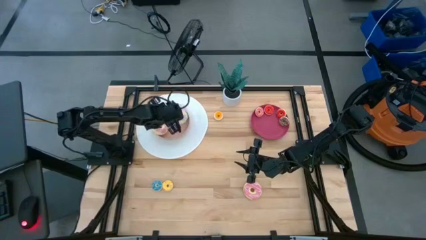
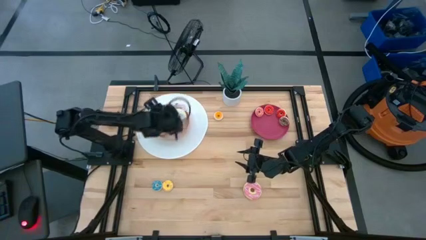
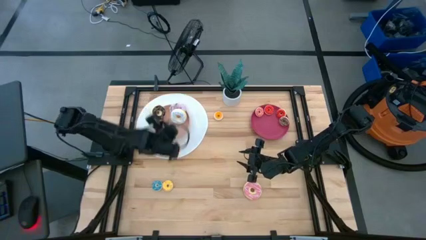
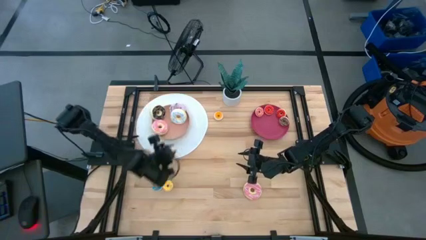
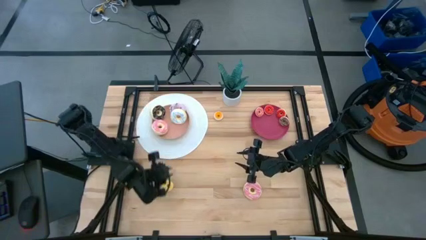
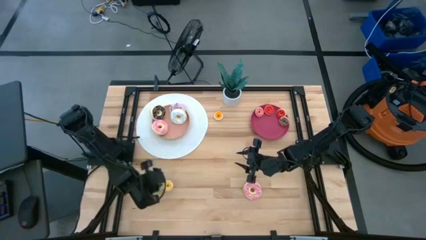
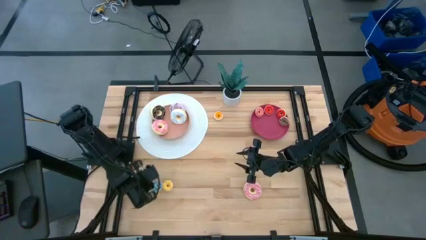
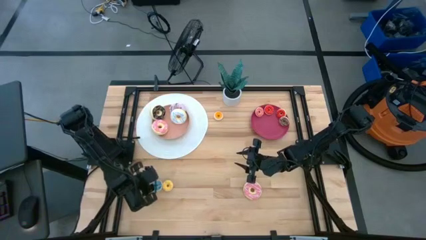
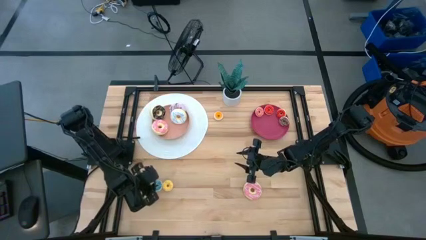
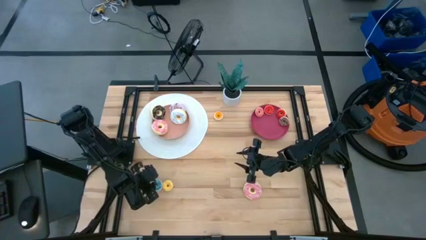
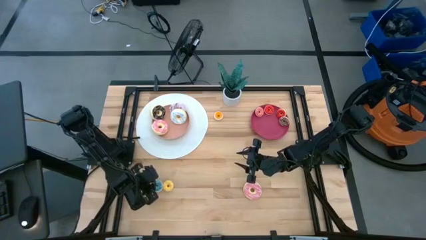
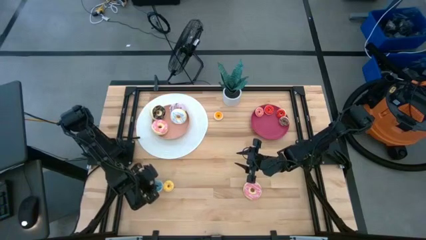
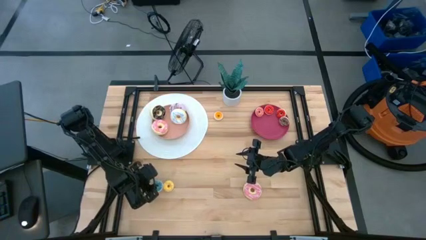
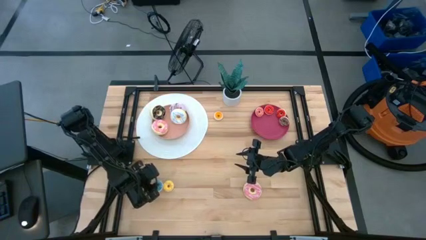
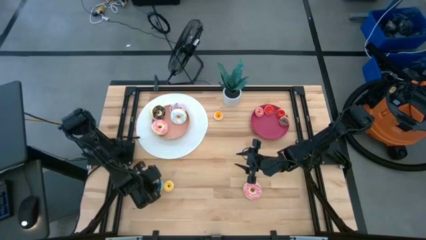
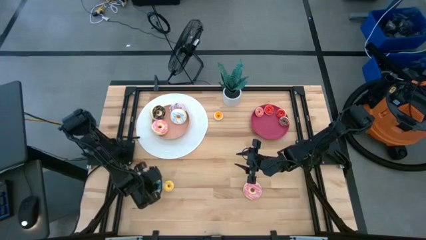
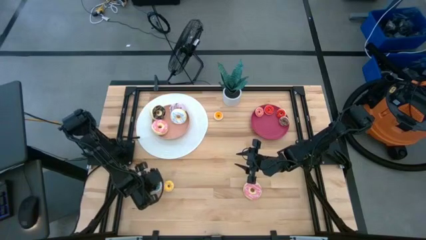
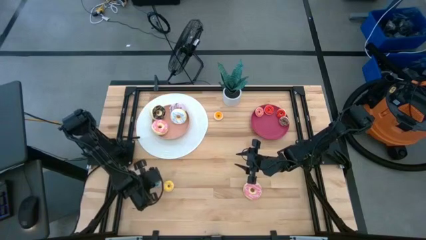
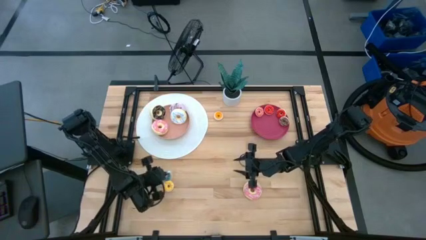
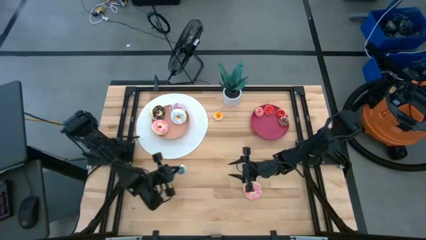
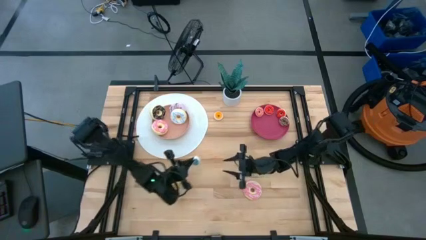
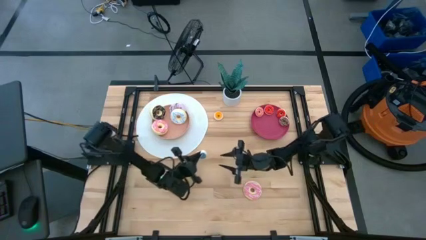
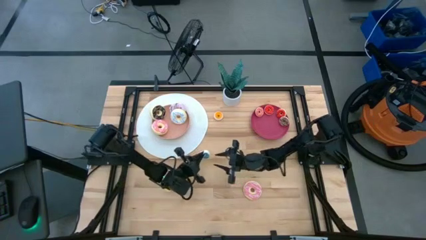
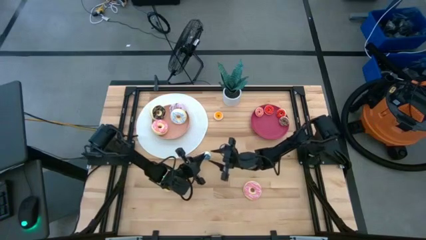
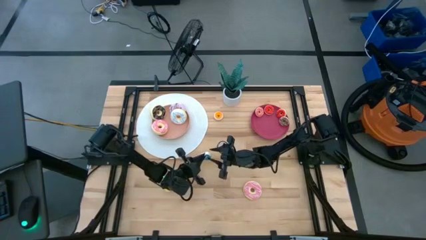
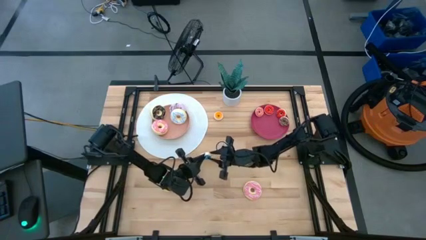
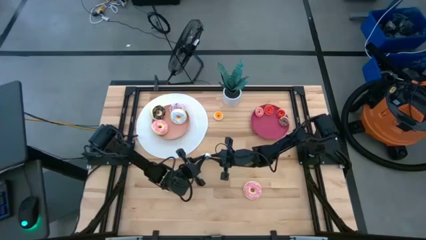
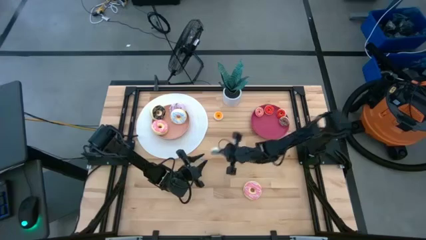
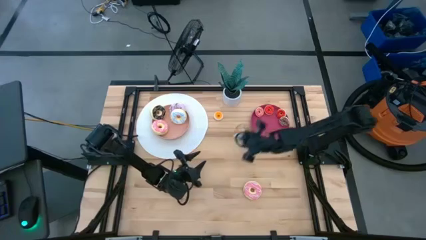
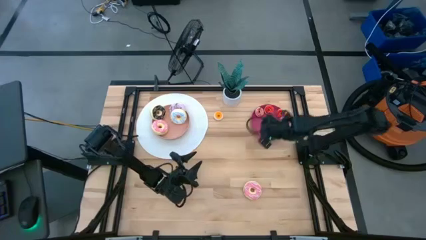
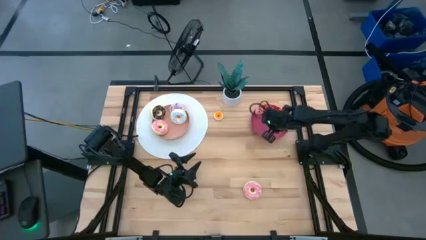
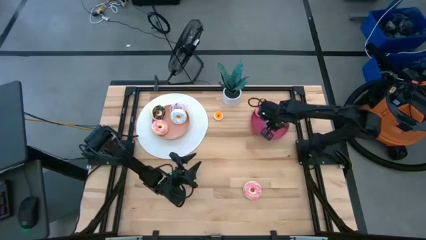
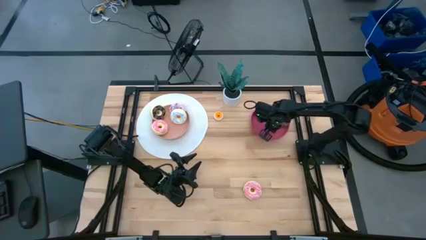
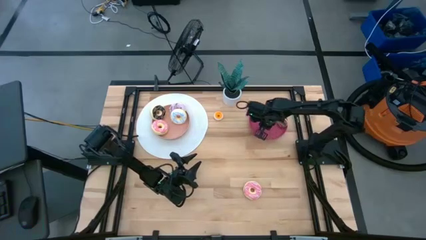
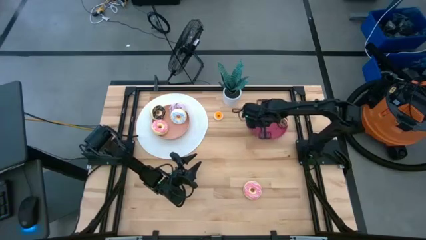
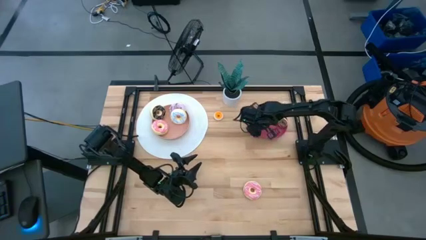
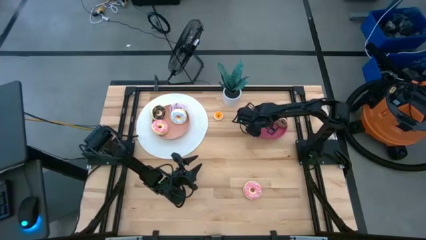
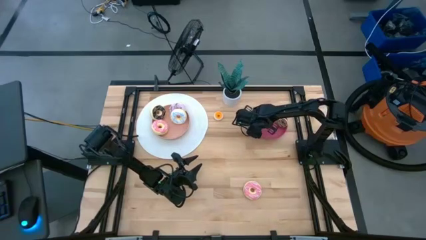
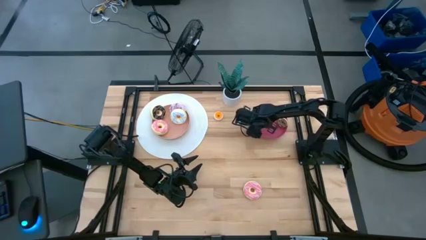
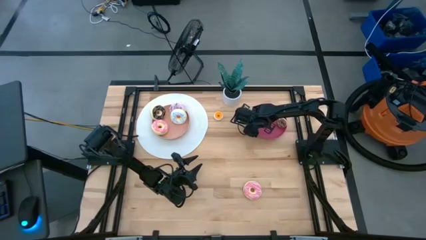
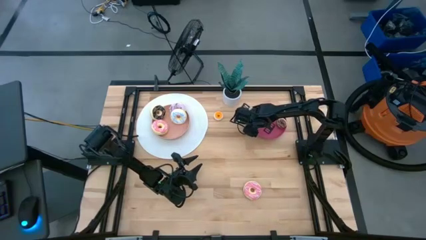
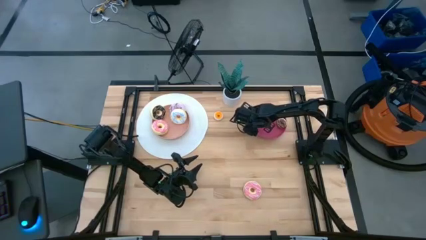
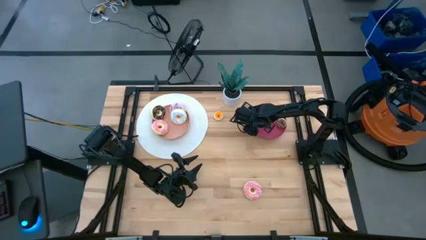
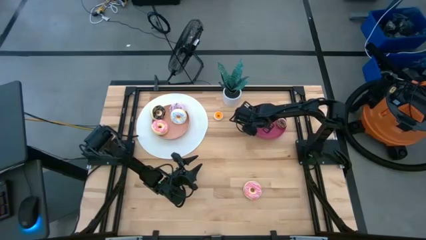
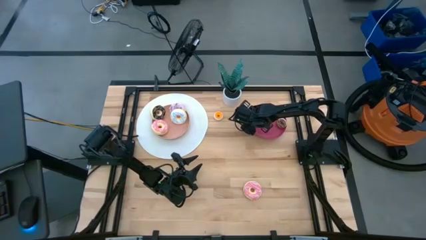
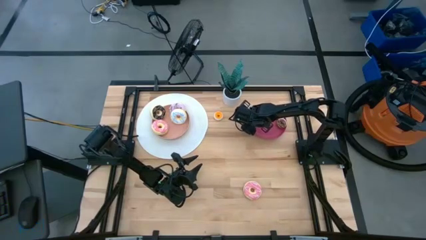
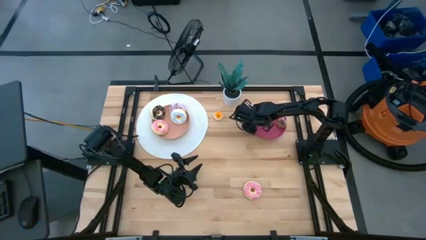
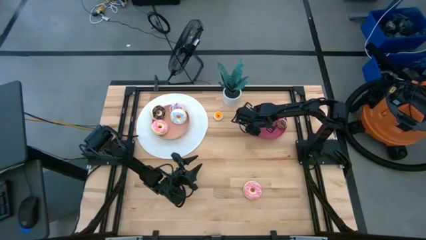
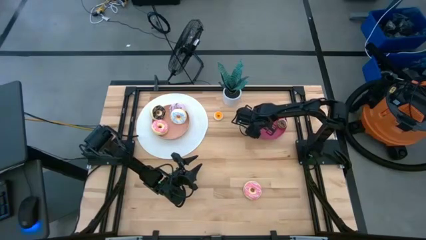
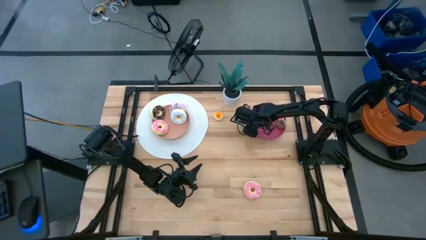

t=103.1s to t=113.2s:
Task: Pick & Place donuts
Put the small blue donut on the red plate

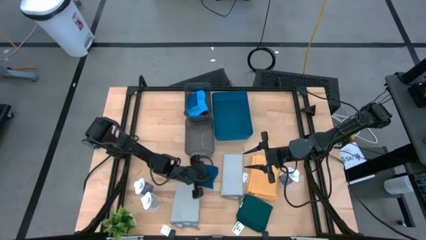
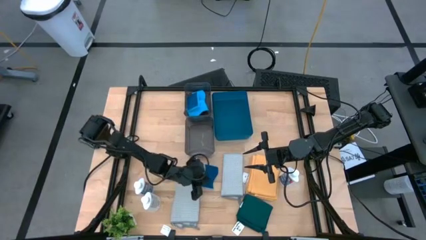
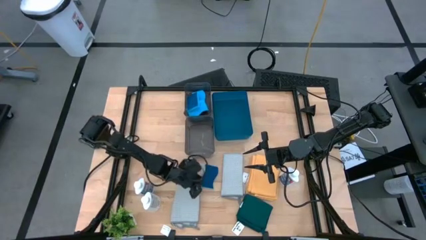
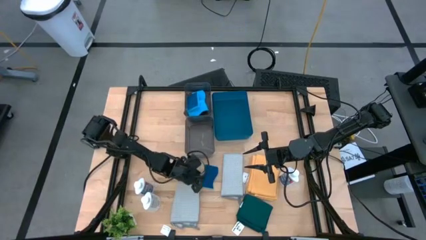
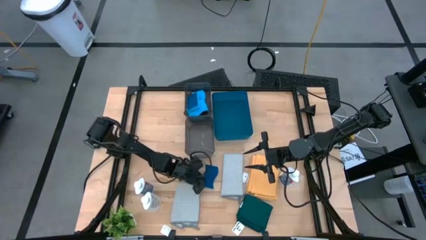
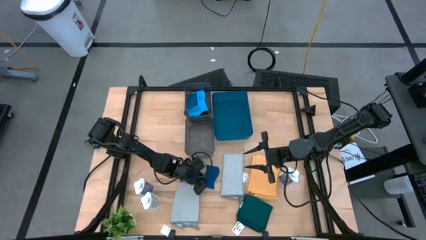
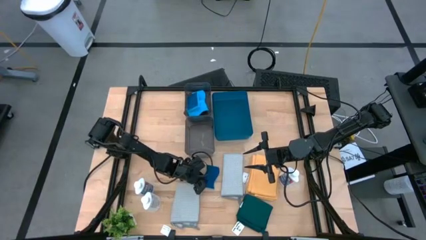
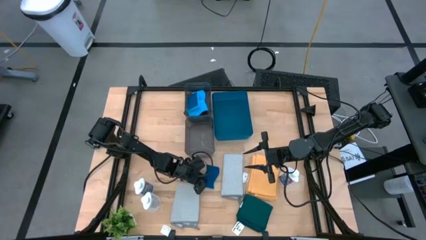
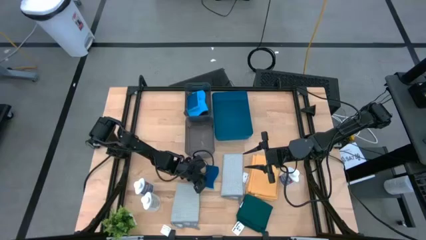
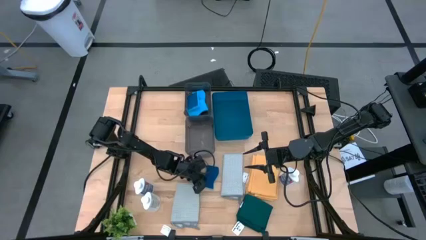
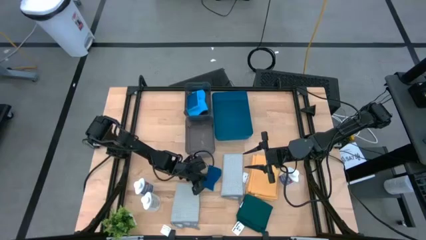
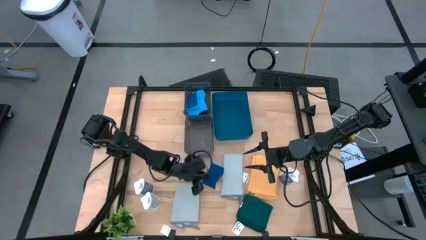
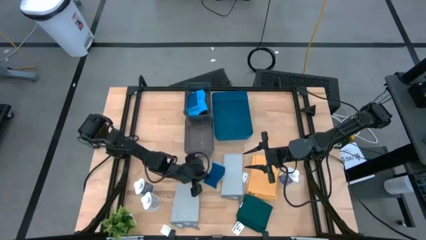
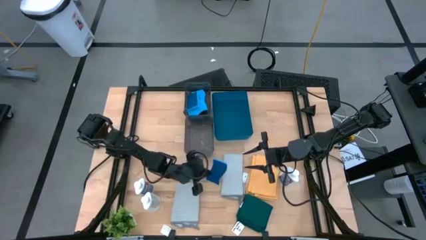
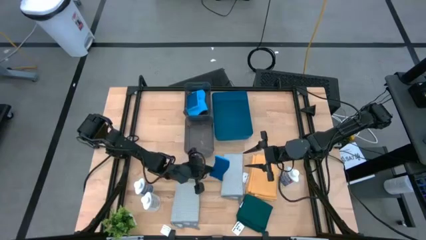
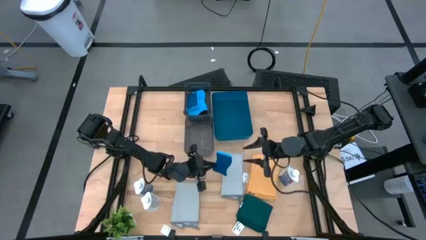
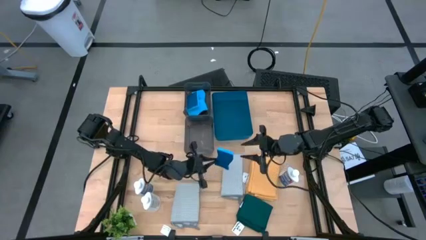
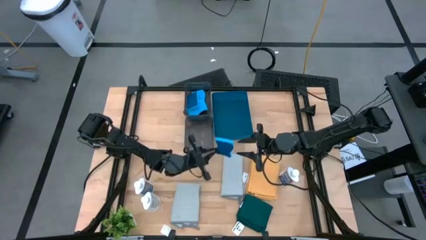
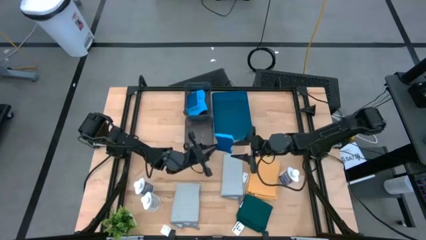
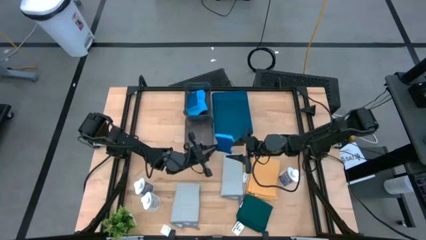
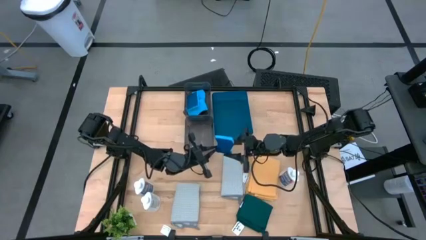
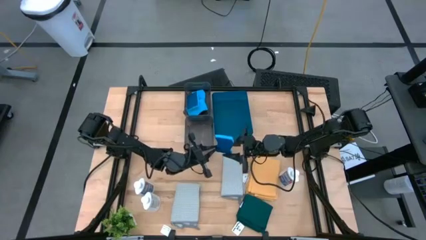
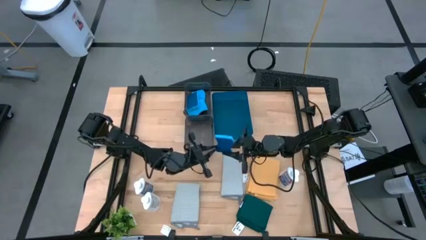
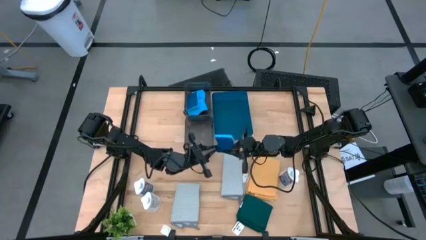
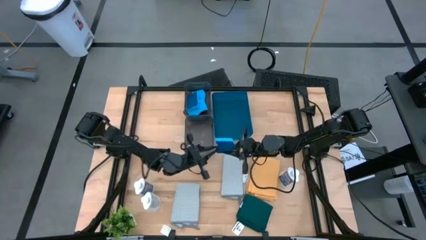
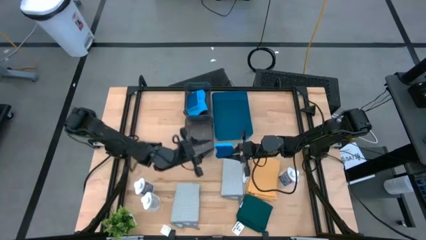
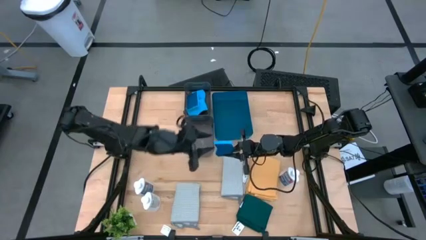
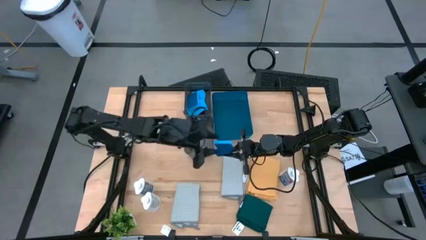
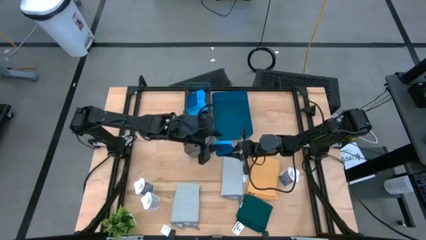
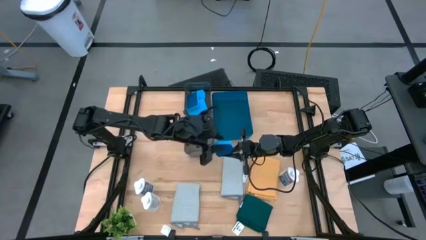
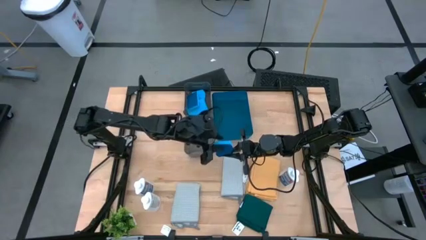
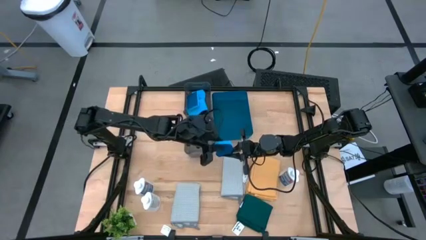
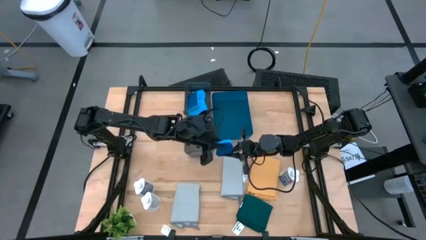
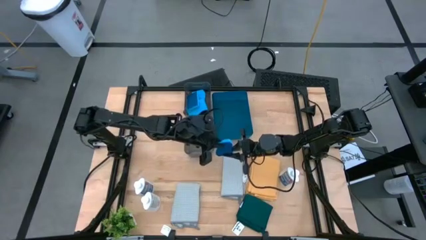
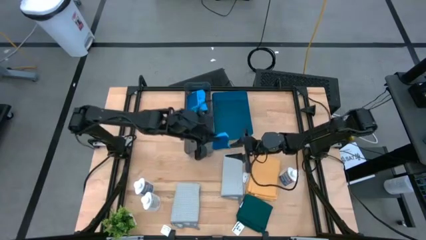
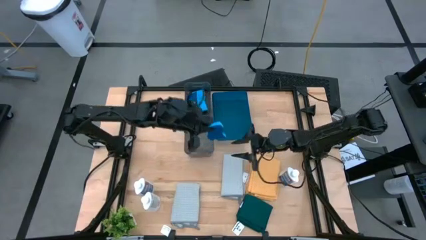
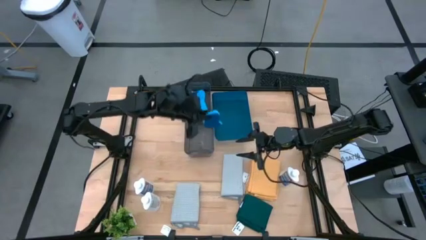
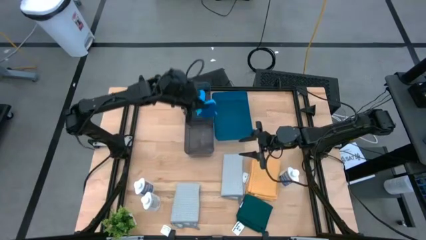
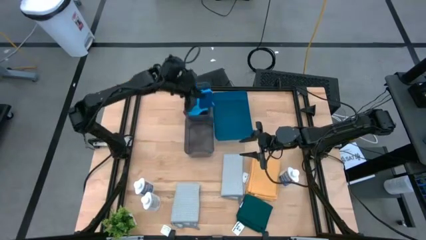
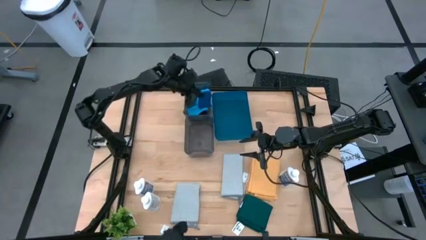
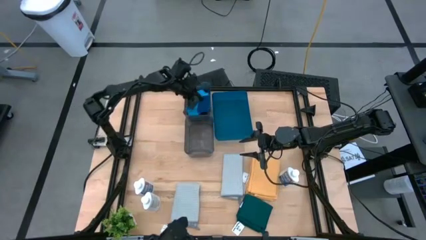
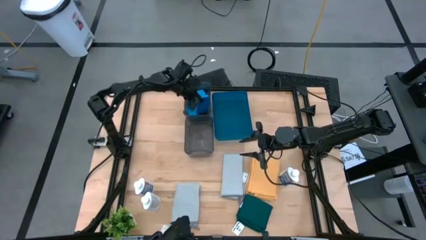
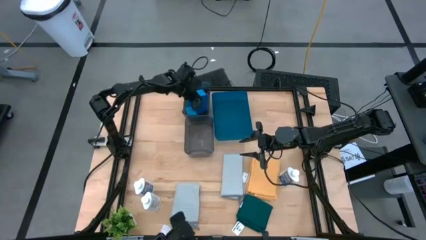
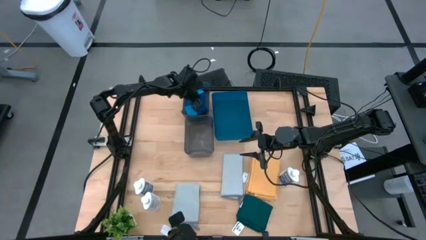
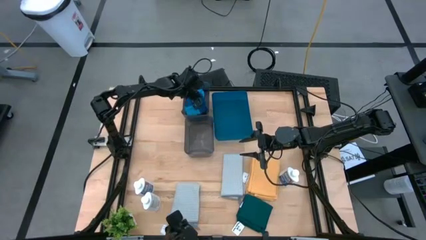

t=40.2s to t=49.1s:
Task: Pick & Place Kitchen Items
Put the blue sponge into the top black bin
